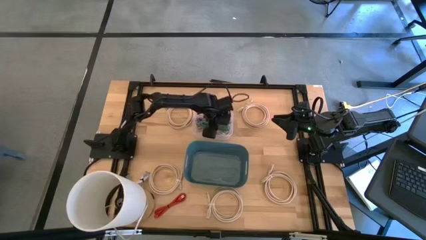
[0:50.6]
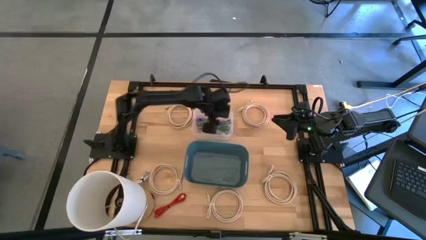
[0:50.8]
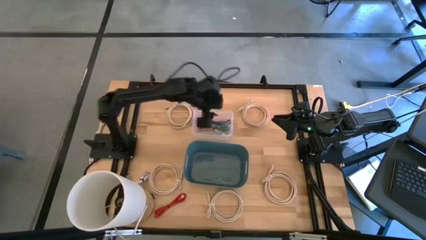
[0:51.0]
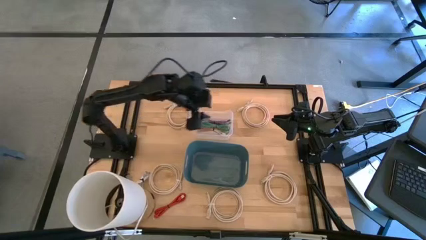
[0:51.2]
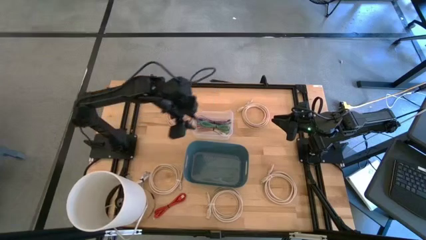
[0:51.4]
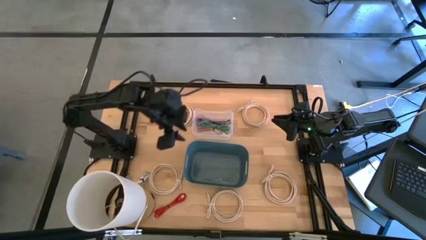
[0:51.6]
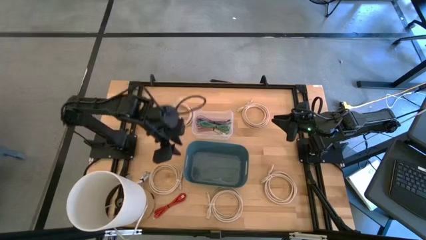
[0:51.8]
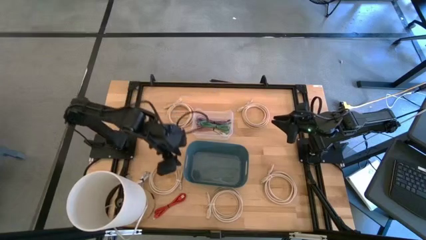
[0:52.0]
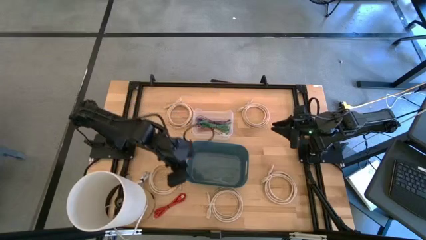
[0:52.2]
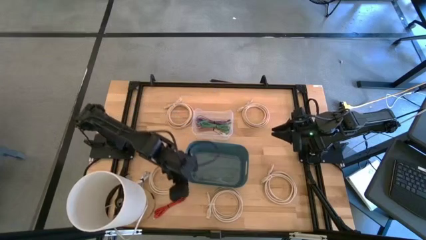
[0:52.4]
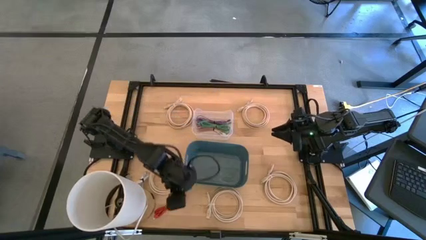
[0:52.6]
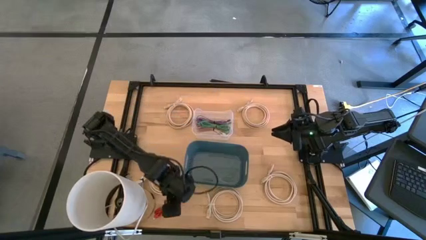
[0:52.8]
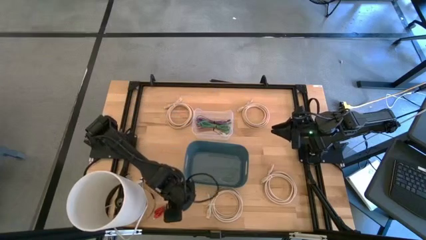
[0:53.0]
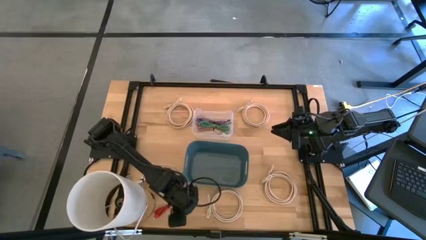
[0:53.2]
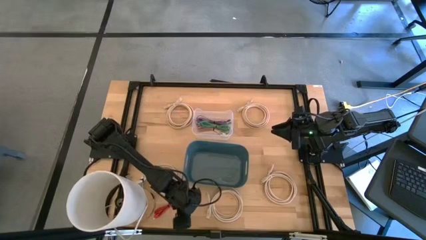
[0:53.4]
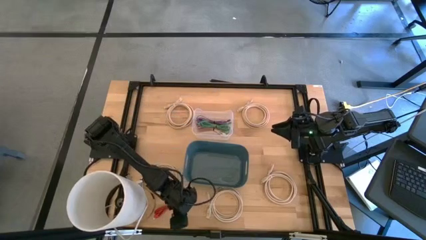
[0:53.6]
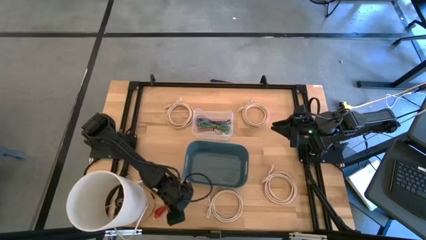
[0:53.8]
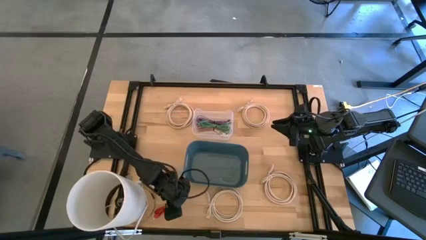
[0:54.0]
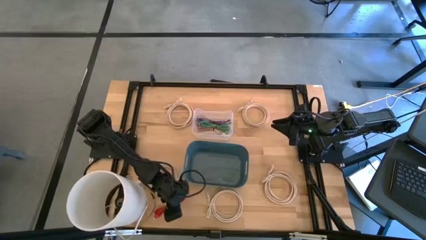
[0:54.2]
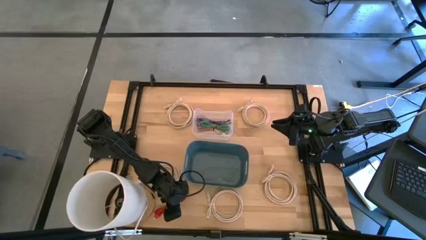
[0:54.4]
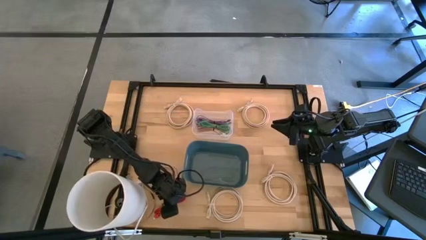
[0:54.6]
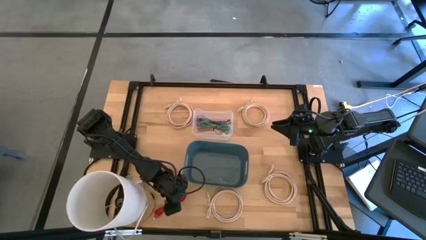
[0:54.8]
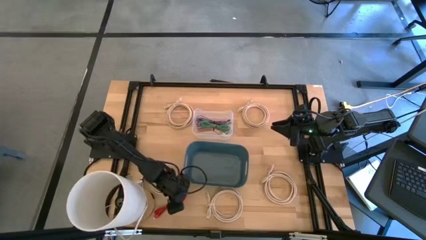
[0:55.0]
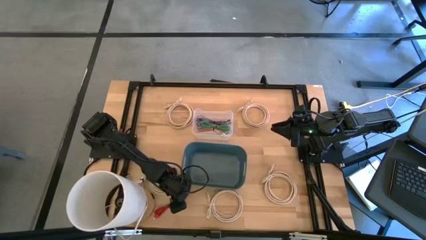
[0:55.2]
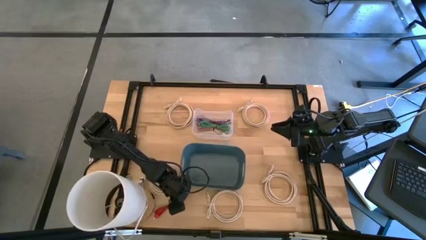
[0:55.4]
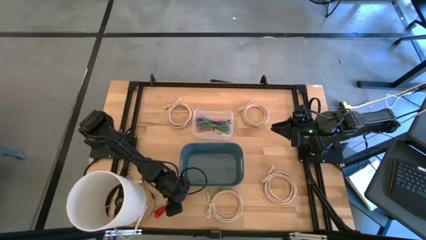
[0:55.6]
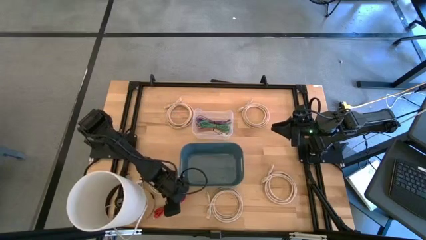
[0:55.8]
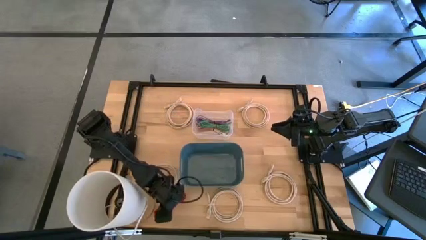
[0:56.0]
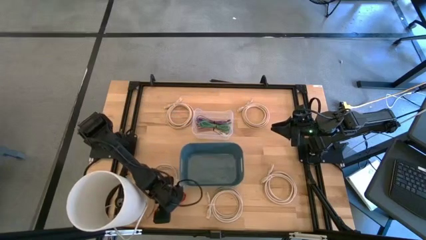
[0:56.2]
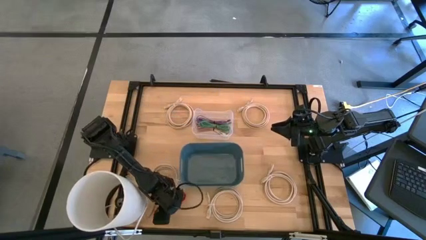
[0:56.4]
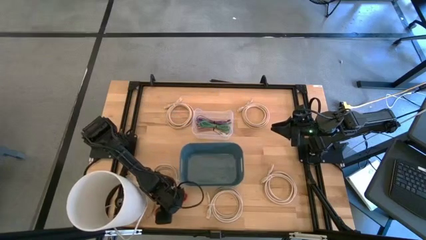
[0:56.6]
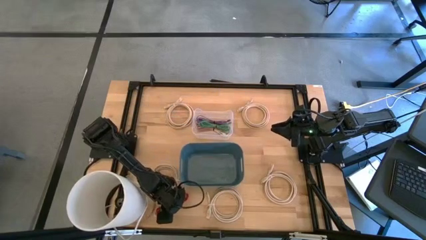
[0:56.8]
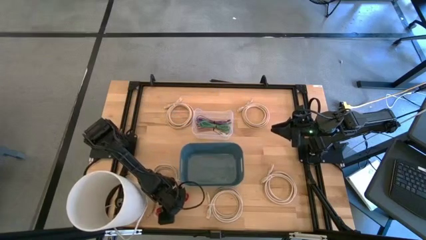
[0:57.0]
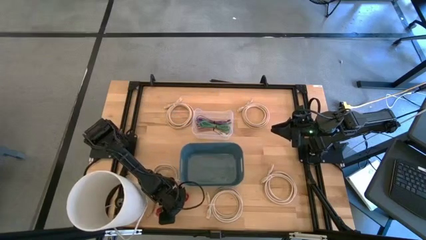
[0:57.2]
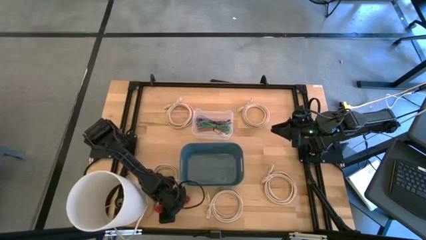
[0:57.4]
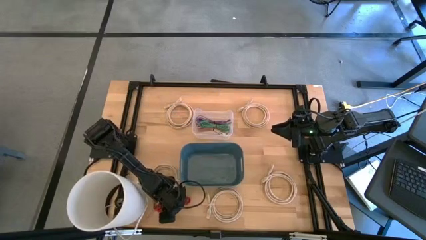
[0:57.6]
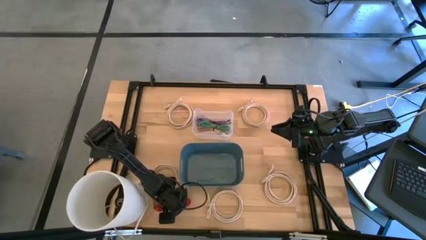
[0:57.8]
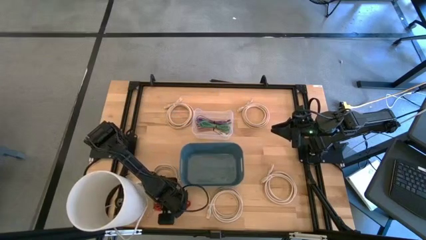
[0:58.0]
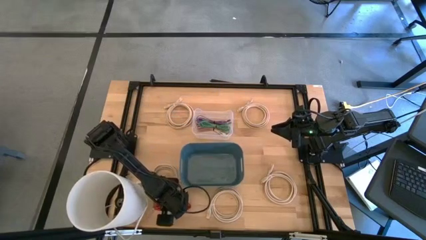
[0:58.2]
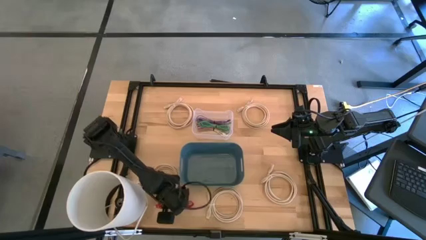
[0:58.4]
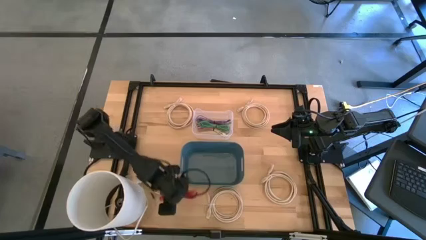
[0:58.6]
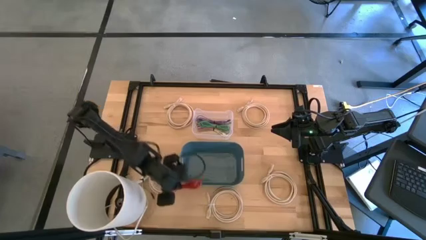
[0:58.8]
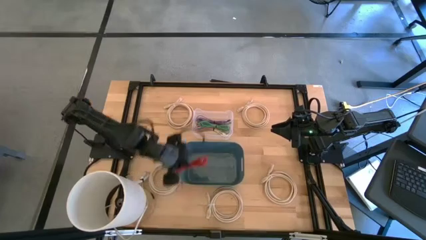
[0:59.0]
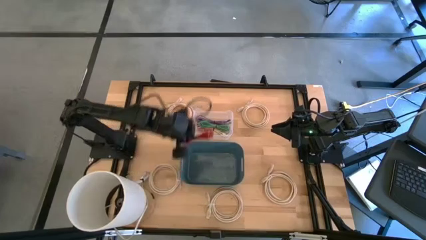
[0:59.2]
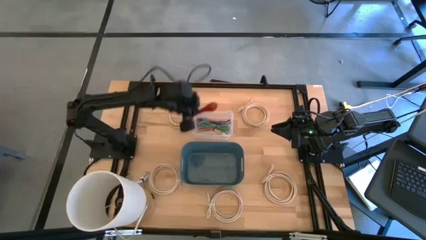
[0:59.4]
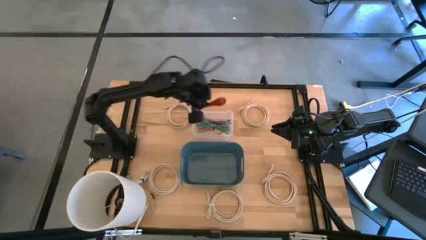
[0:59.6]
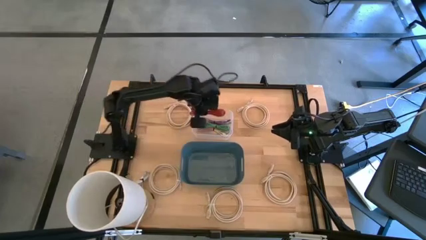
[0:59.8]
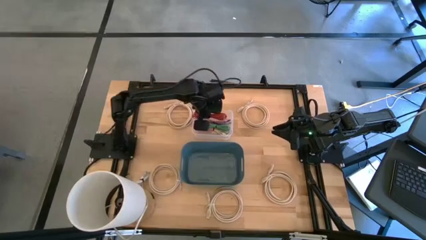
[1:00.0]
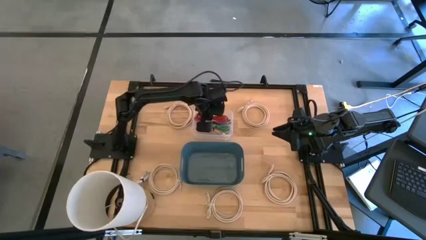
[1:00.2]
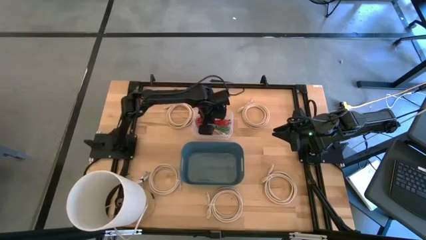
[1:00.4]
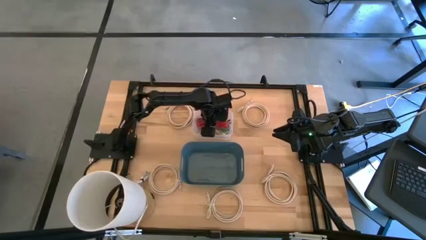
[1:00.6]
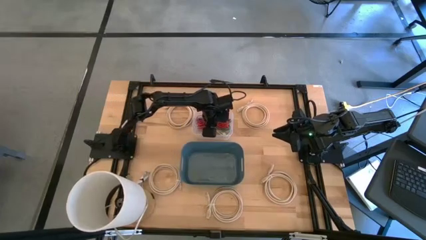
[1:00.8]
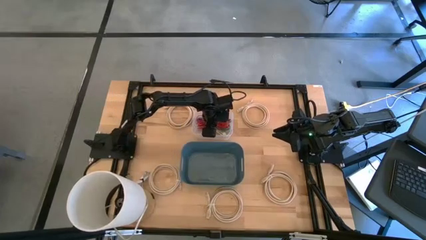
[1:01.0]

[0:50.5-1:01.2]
Put the red charger cable into the transparent bin

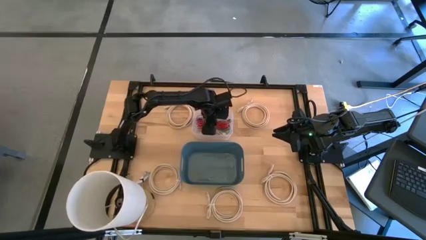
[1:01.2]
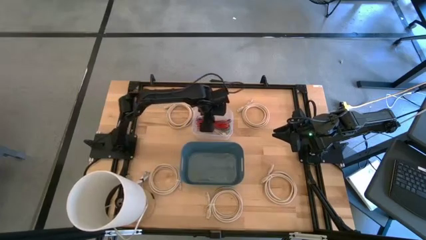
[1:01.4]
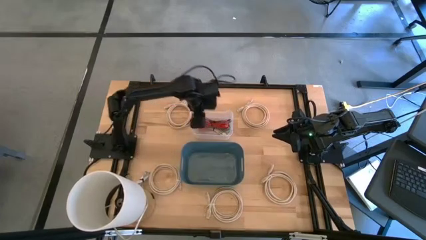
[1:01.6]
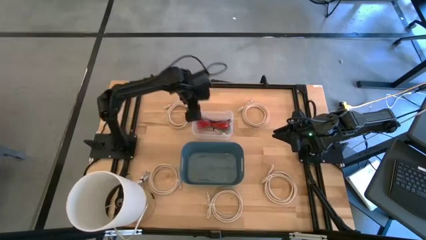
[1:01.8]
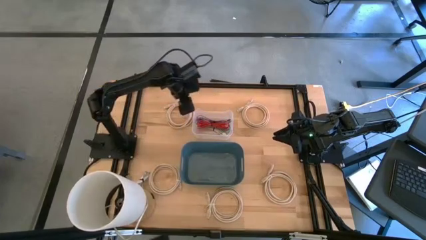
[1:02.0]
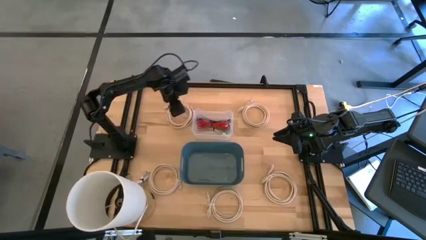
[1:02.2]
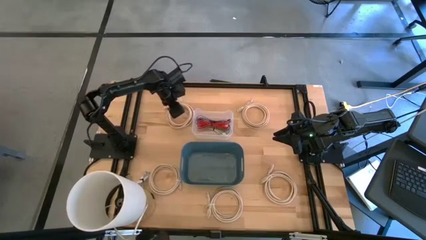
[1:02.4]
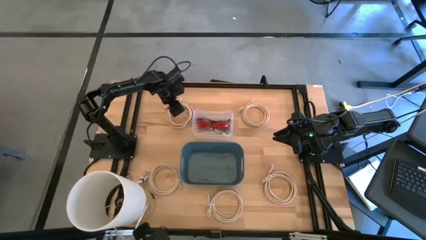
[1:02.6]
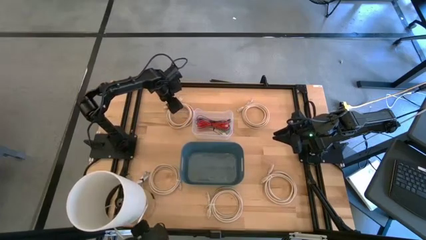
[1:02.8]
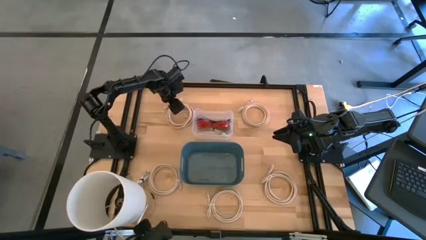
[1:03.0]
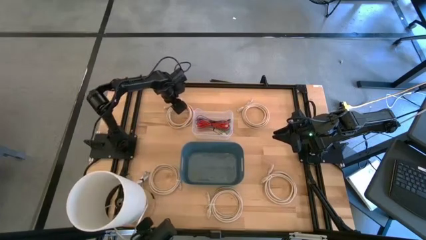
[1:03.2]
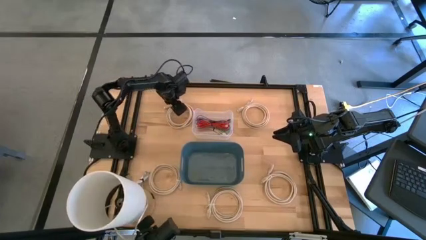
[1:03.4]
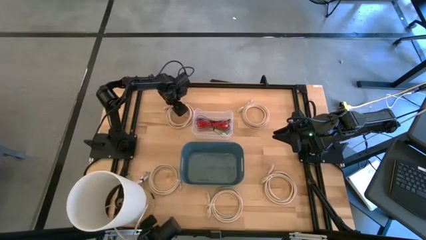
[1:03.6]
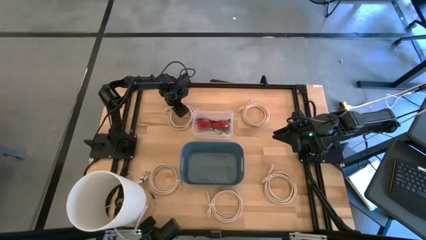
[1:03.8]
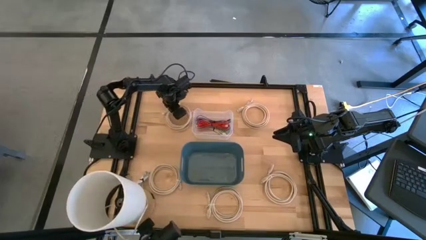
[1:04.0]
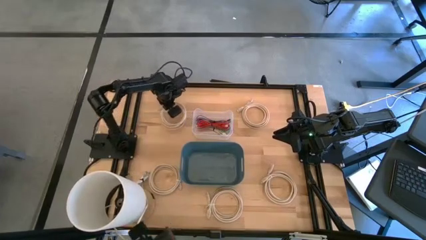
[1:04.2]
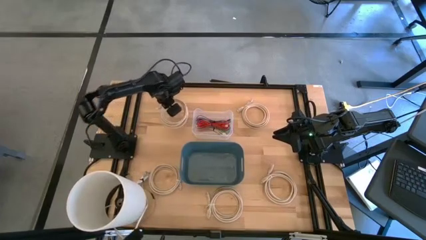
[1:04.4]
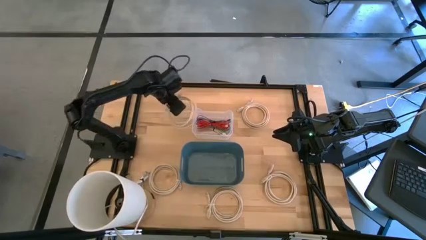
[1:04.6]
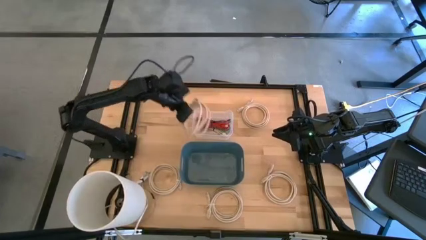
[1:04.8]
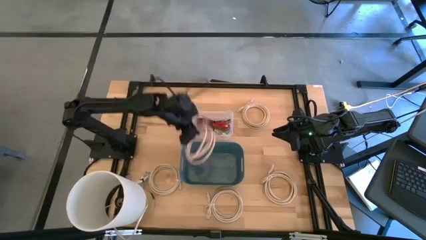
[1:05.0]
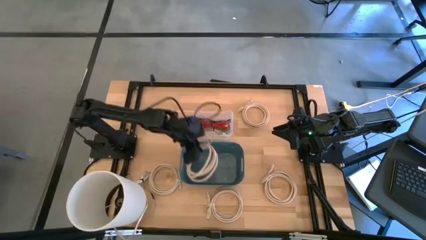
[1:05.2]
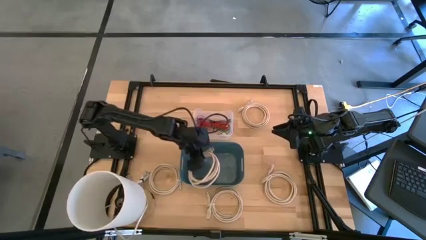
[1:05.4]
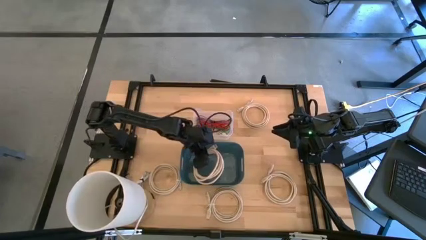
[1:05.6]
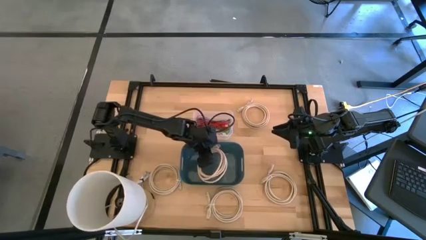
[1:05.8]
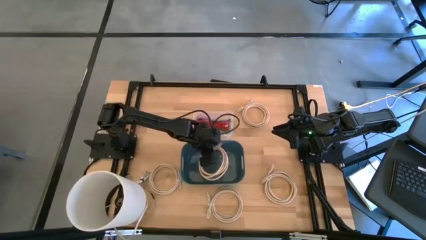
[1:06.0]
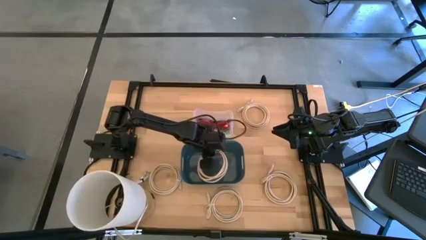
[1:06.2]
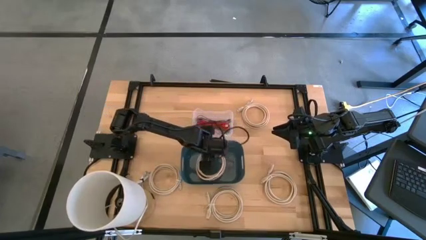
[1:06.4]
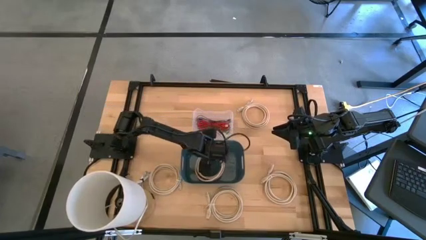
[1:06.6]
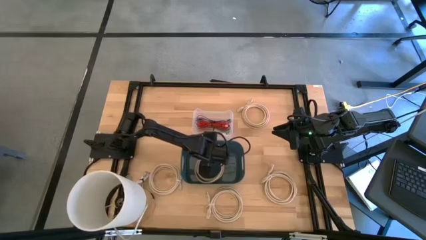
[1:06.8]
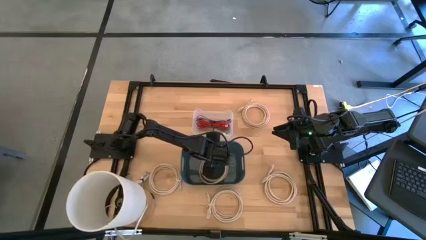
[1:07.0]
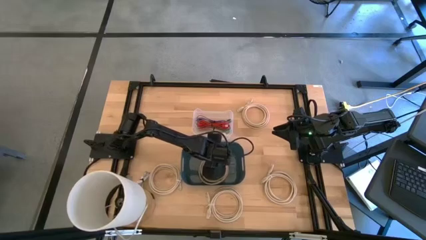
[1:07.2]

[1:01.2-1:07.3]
Put the brown HDMI cable into the blue bin
